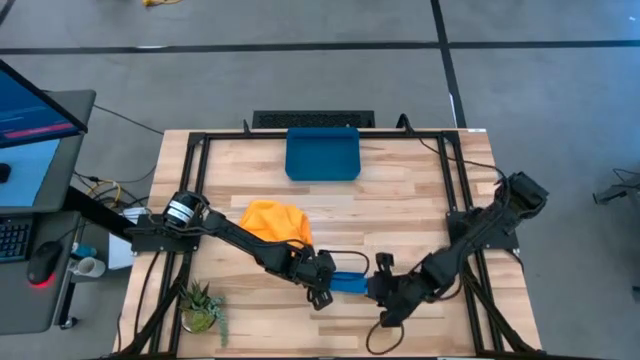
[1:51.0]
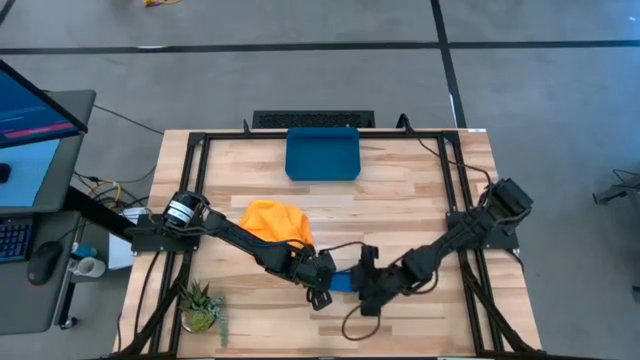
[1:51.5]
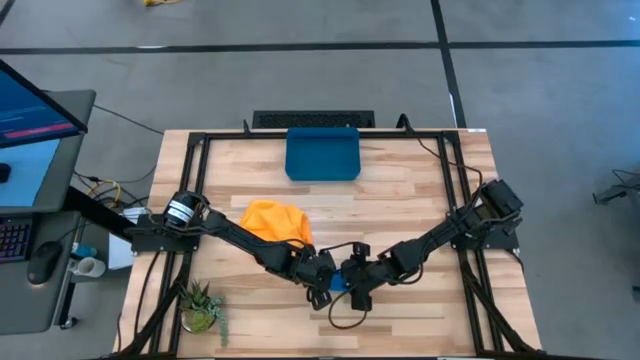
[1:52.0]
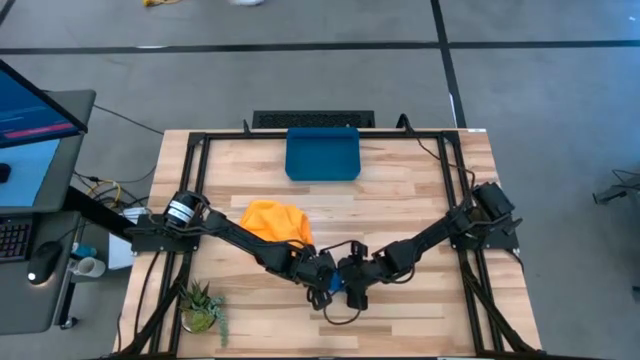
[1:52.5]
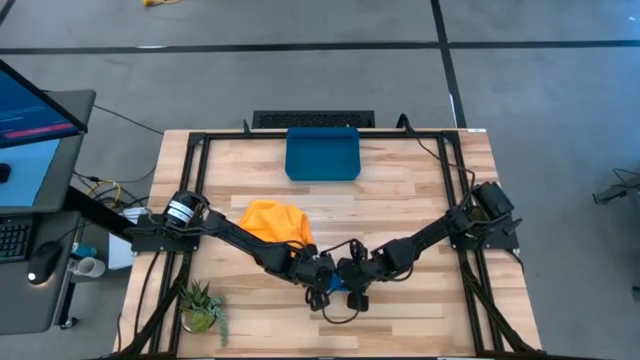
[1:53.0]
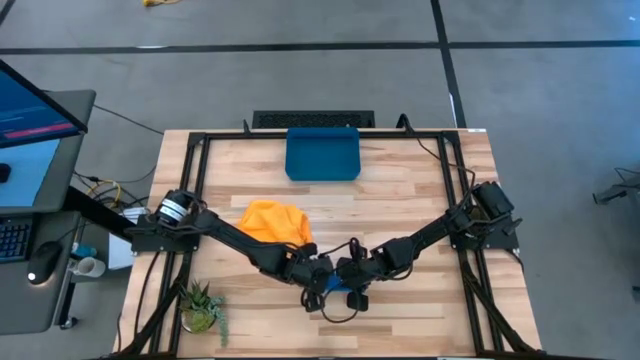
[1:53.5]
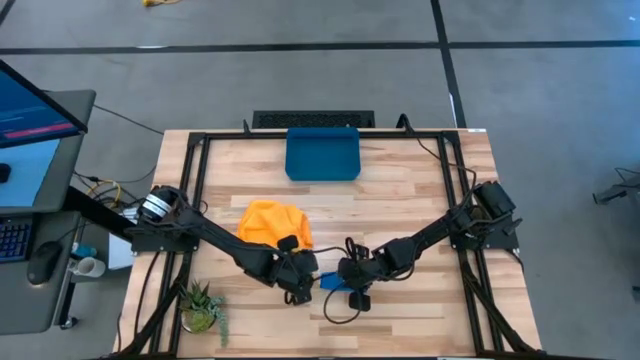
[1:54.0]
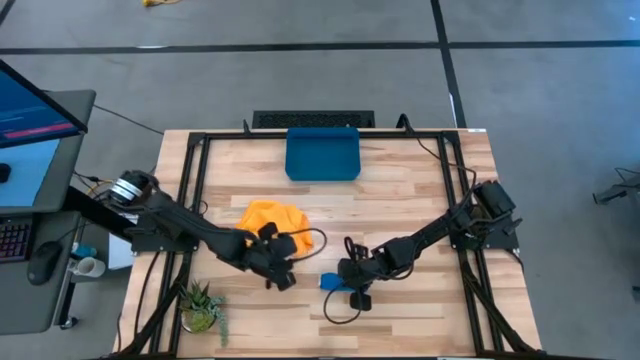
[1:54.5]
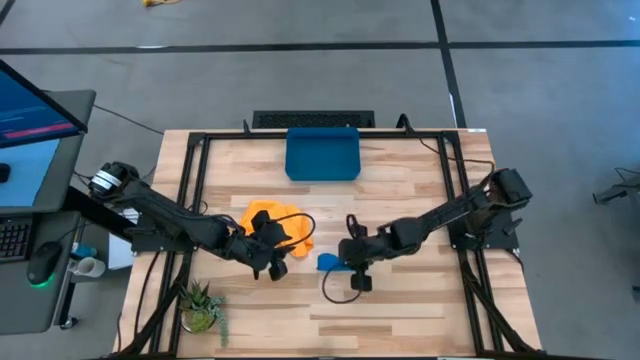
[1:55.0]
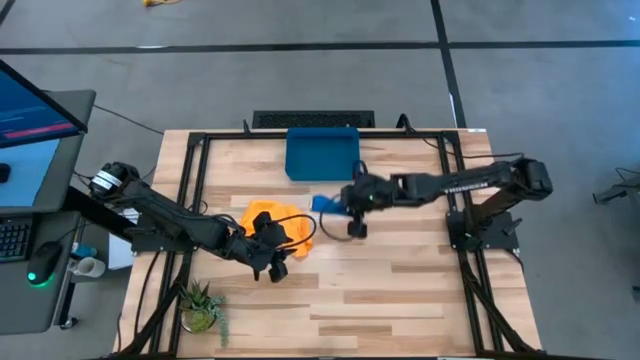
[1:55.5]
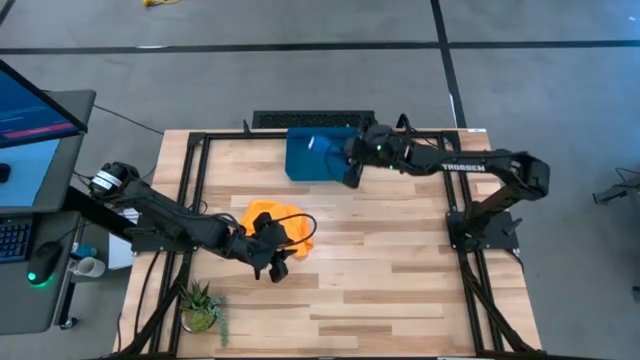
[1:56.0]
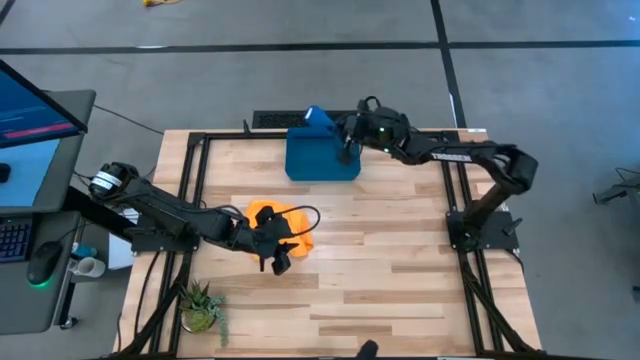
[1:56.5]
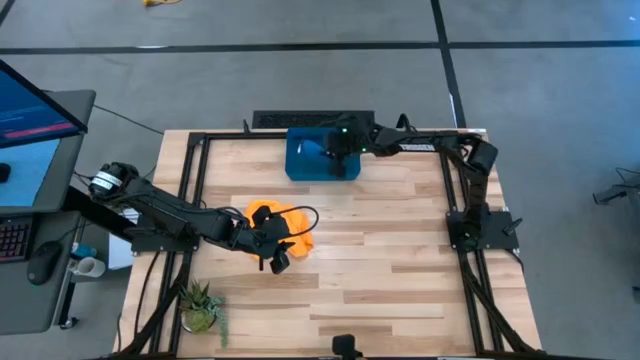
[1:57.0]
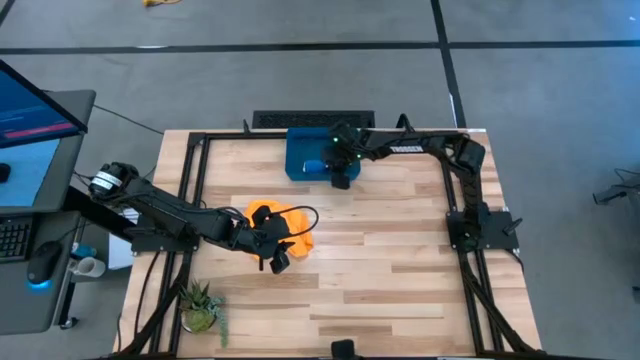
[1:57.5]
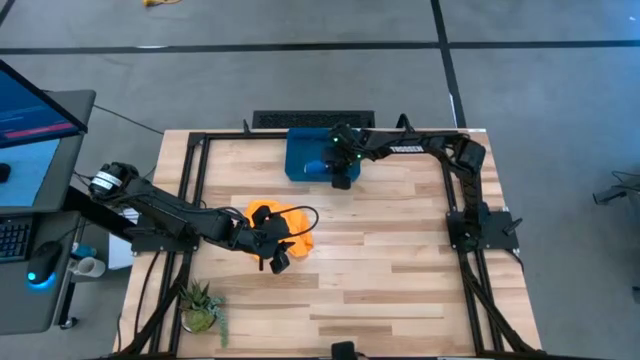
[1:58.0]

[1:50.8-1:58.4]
Task: Roll microfiber towels into tight, uniform cylinder then place into a basket
Put the blue microfiber towel into the bin
